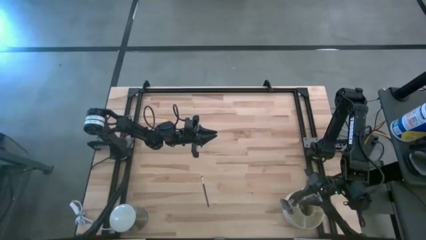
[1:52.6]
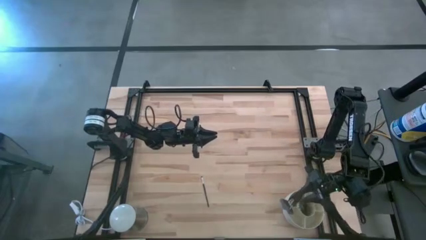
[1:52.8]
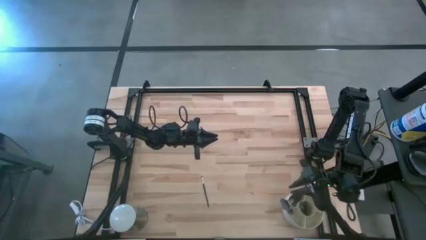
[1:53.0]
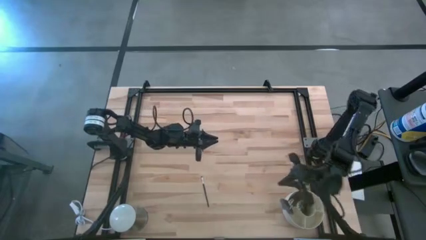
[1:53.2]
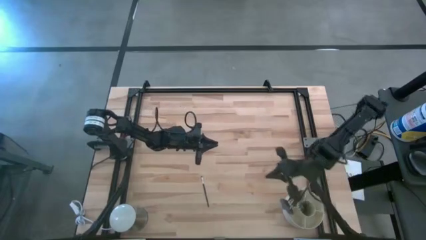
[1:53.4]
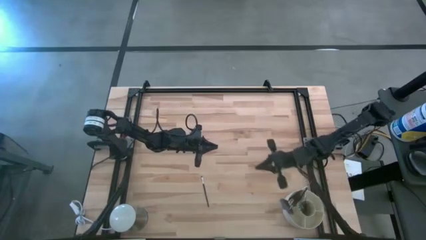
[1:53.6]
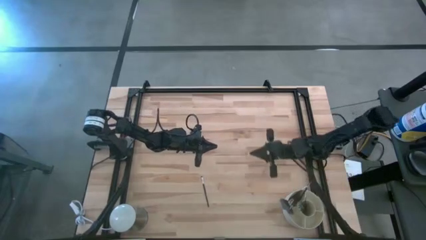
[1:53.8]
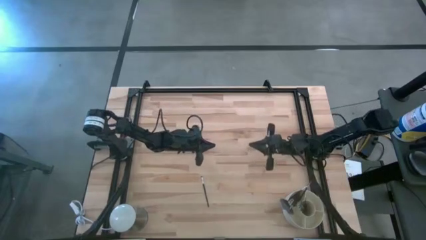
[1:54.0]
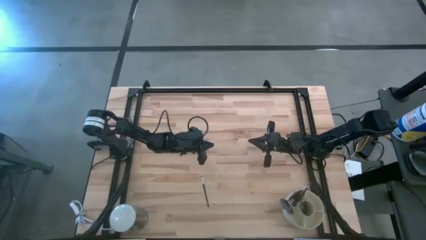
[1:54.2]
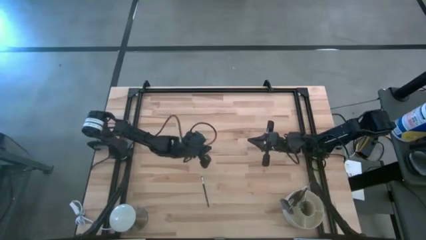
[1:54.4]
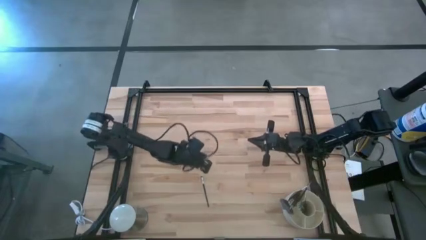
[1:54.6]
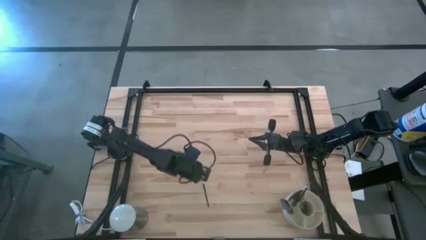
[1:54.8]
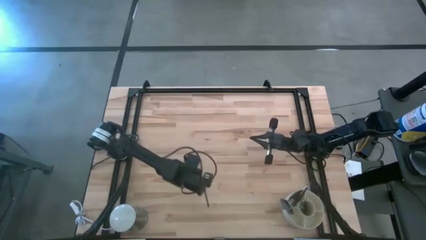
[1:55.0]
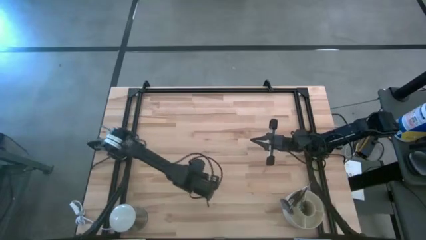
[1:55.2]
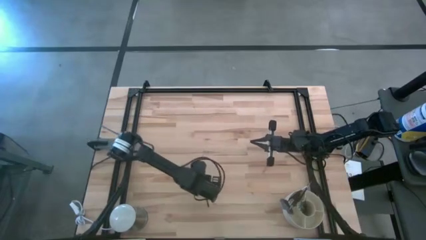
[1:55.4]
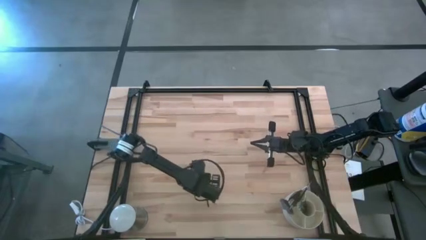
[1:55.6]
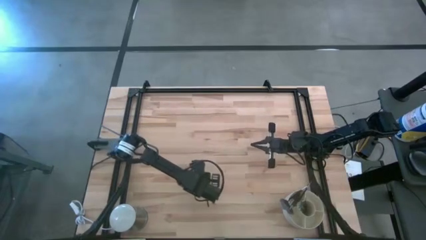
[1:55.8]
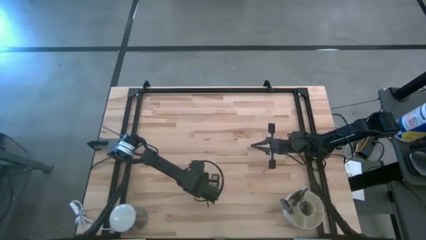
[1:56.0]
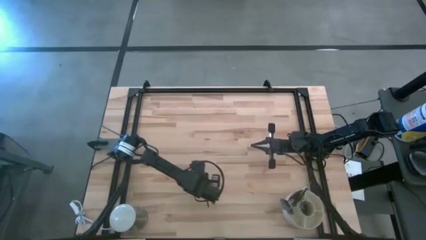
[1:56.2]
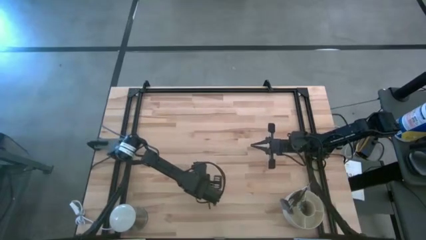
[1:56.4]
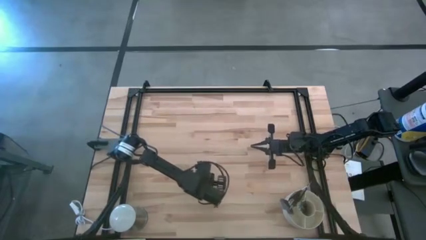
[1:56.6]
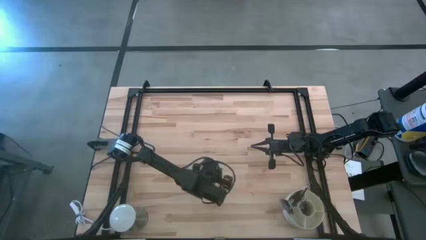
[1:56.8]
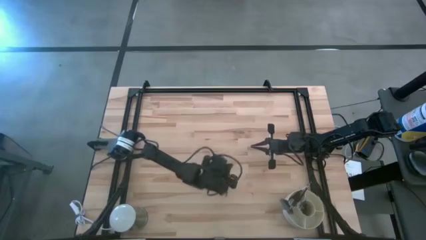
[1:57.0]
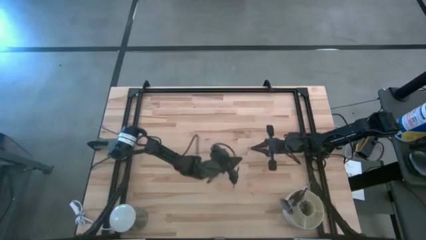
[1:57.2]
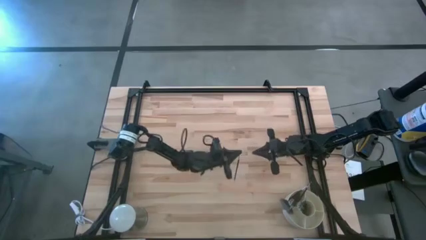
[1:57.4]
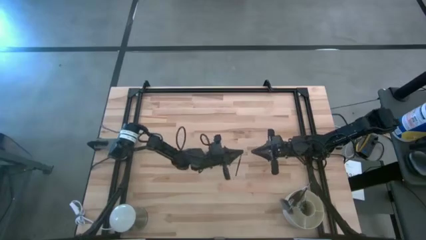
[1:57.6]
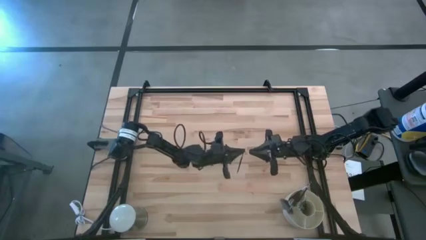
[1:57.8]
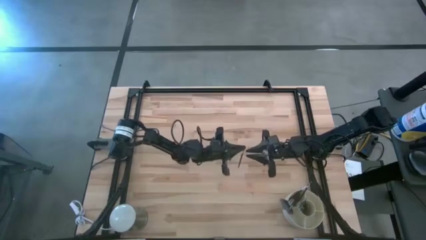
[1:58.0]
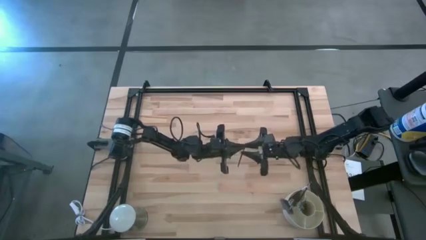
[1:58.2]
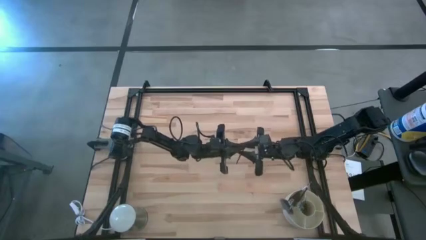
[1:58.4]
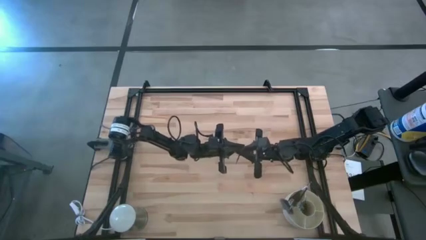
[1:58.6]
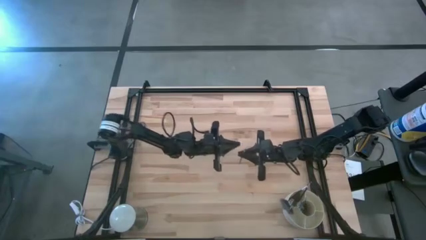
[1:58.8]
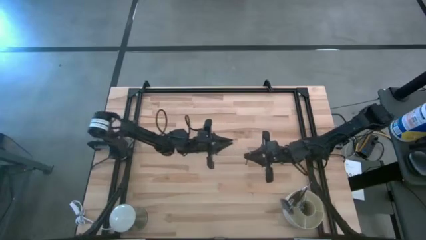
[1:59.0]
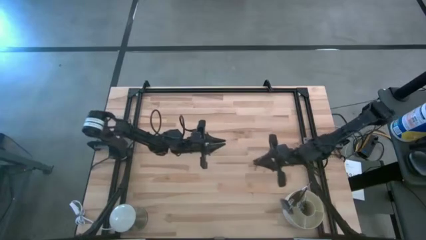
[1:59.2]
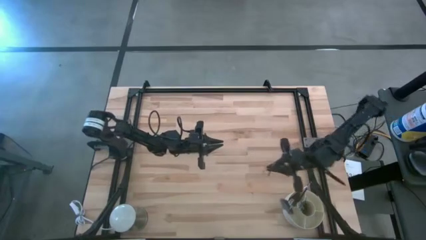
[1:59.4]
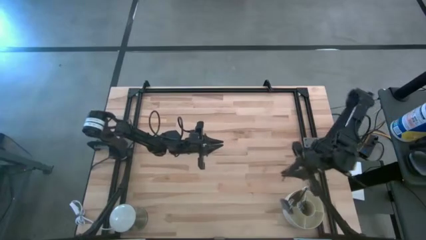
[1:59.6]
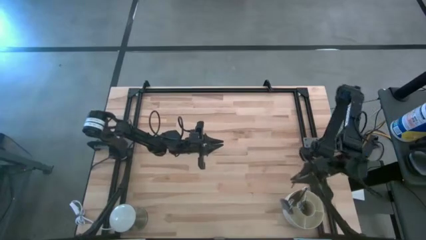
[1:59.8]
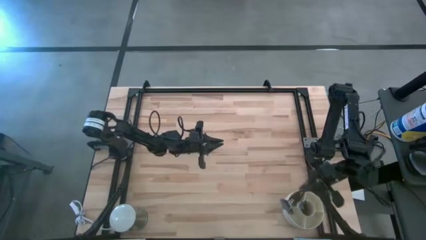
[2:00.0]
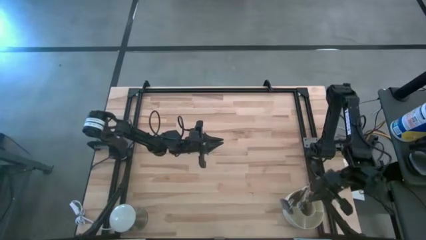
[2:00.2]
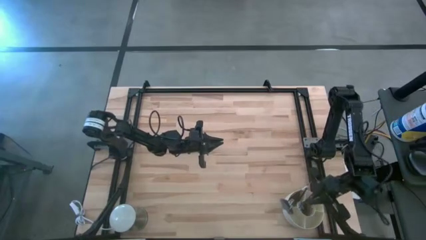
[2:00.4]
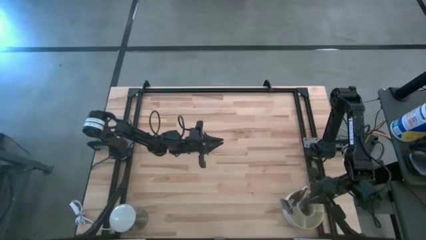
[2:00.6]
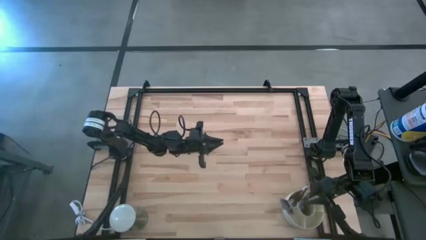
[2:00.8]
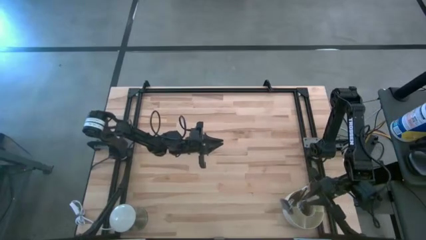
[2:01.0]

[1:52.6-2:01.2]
Task: Put items in baskets/containers
Put the black eyeshadow brush into the white organizer

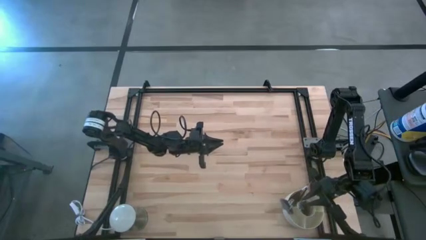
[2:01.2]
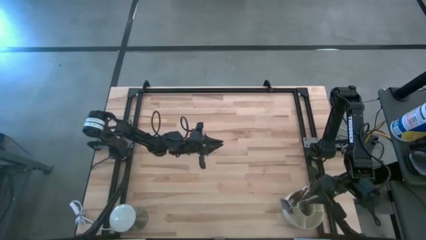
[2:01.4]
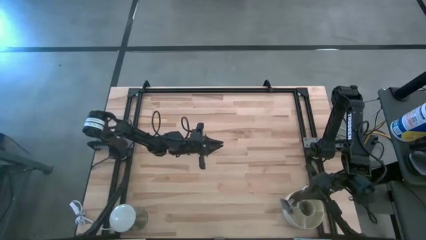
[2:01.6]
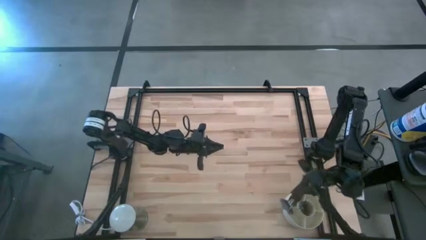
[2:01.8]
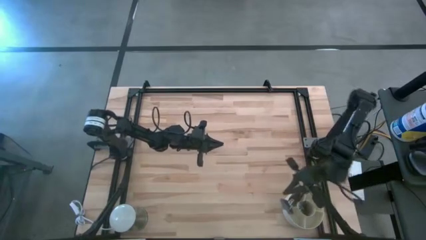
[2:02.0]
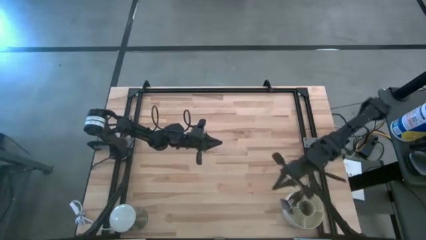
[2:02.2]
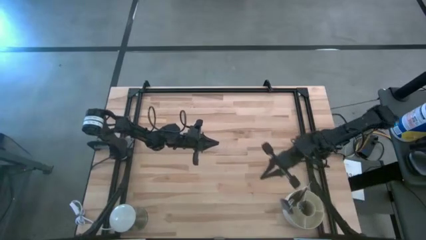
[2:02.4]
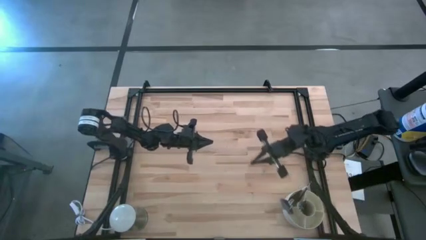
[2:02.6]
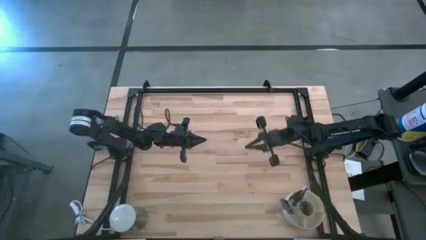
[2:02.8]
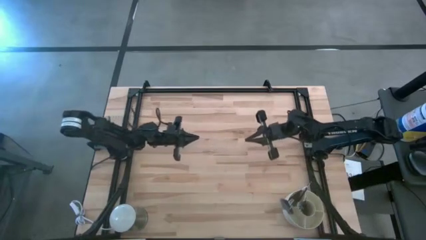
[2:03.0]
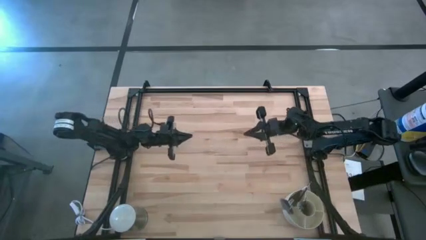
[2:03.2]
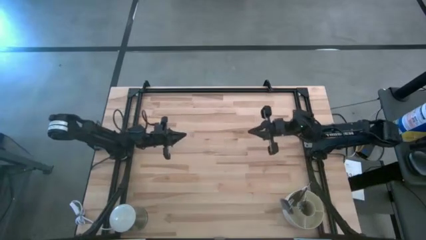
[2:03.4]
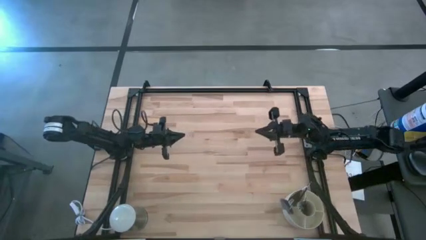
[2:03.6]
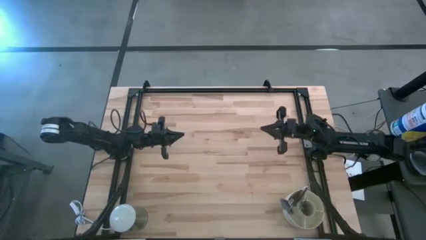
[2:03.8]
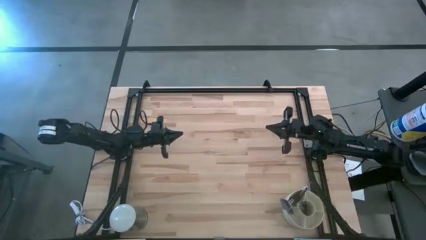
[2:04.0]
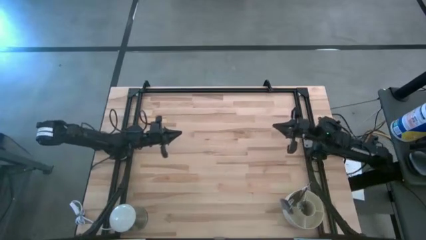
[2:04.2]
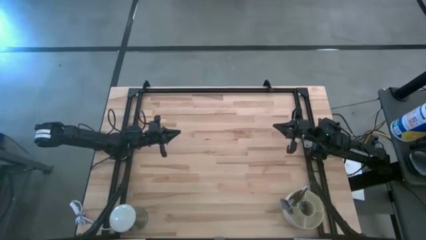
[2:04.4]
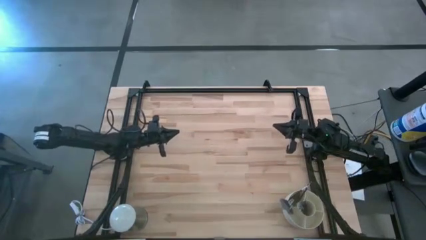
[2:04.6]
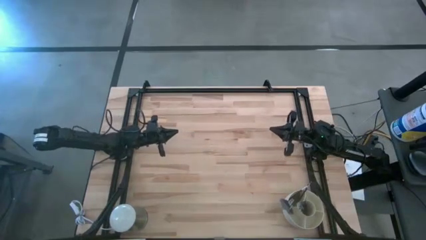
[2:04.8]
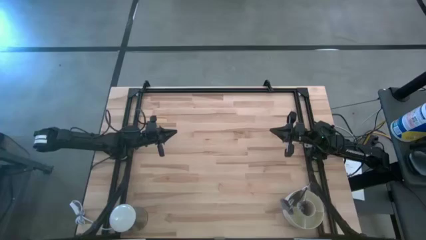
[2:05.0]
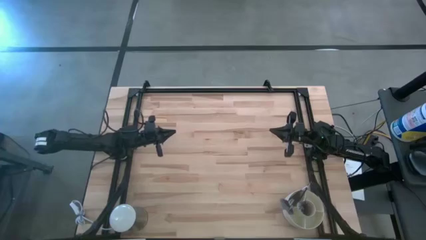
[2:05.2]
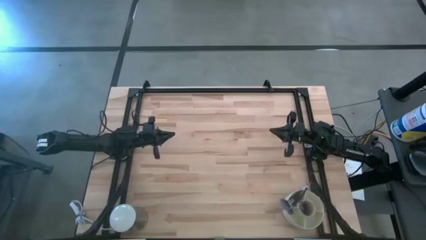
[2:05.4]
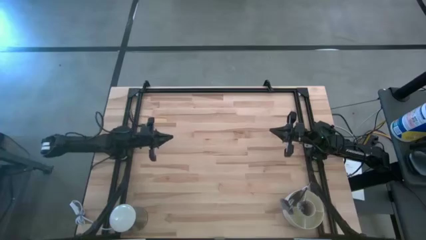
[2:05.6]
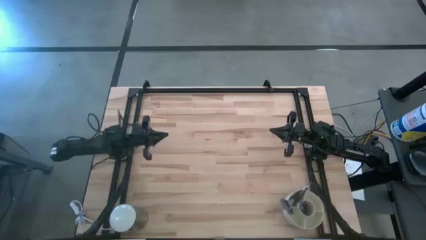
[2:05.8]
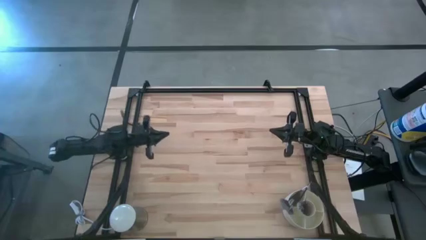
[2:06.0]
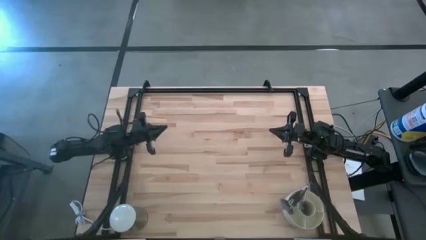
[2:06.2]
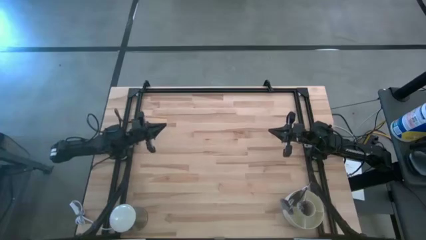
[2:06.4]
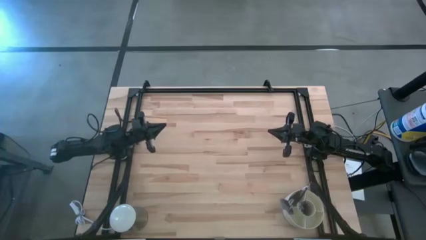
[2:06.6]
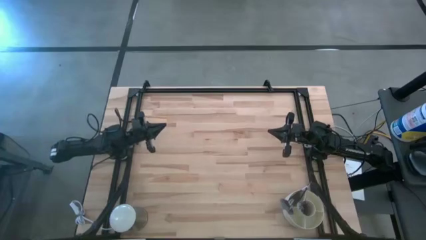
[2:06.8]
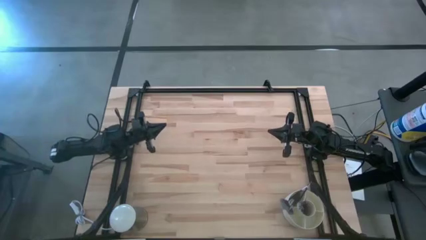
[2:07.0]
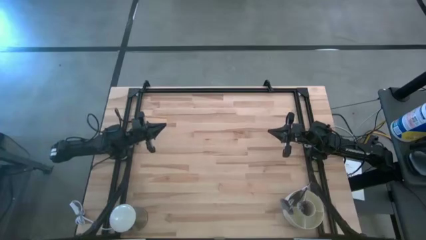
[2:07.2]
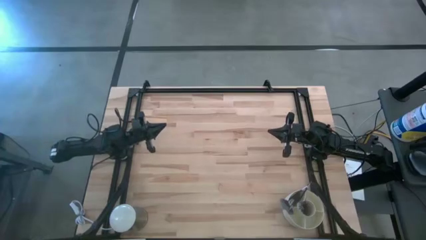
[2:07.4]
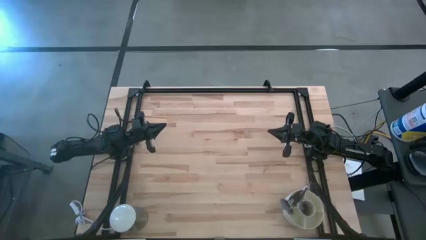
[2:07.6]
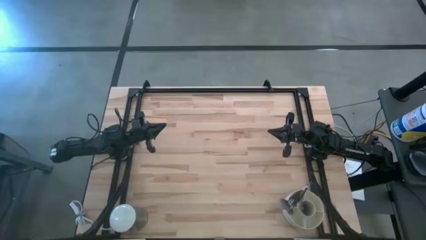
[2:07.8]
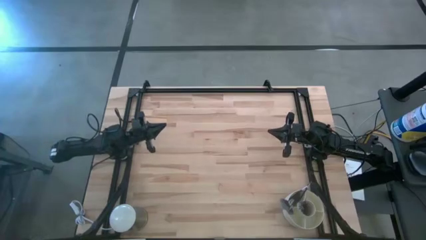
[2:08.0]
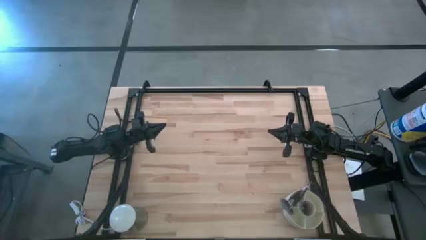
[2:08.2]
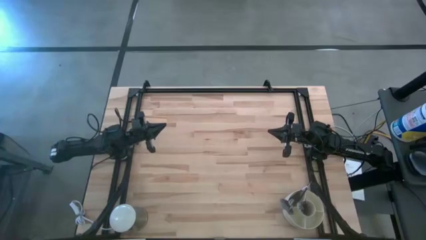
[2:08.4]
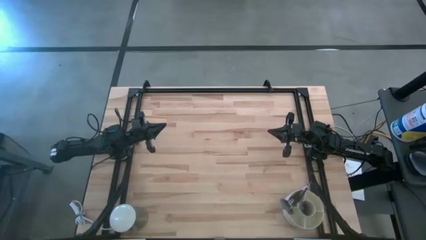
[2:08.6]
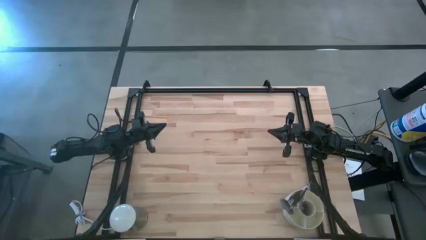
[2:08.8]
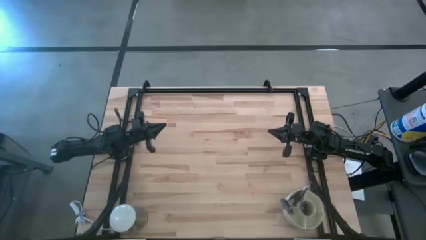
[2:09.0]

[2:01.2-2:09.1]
Return to Home Position
